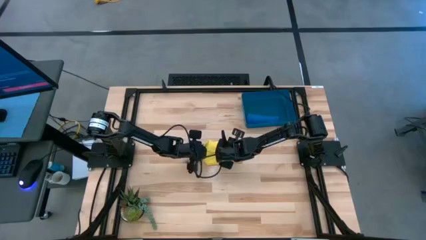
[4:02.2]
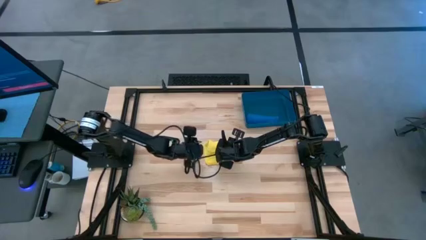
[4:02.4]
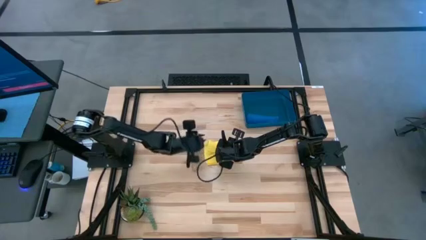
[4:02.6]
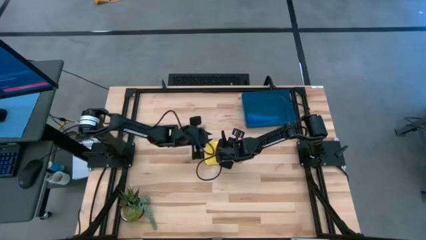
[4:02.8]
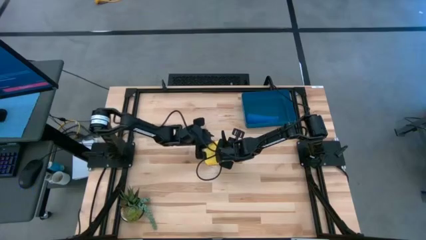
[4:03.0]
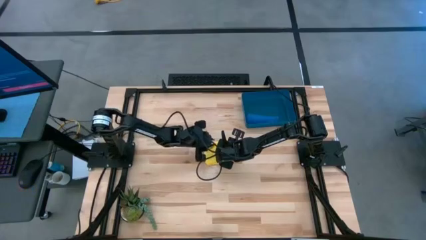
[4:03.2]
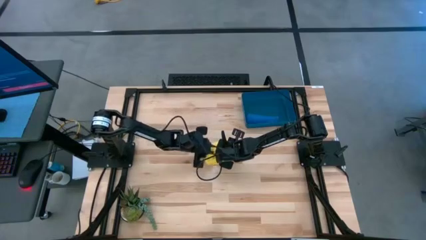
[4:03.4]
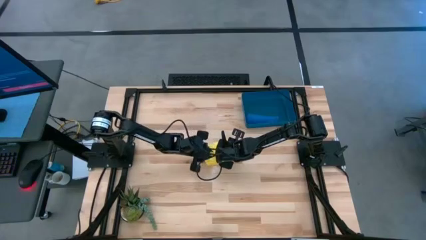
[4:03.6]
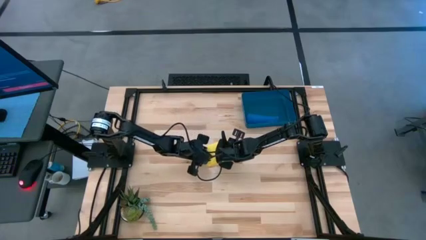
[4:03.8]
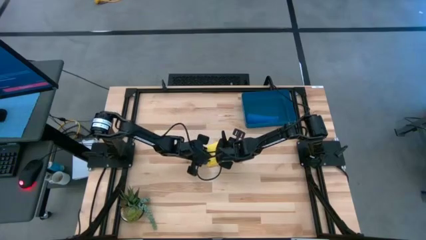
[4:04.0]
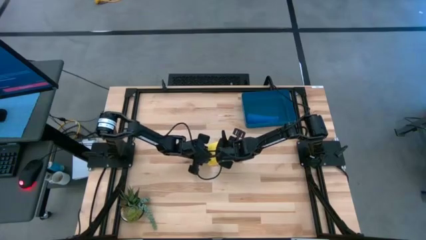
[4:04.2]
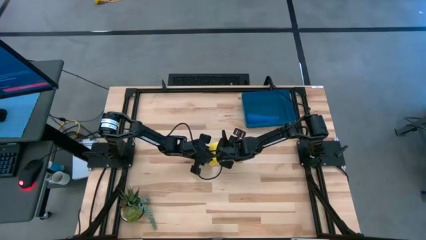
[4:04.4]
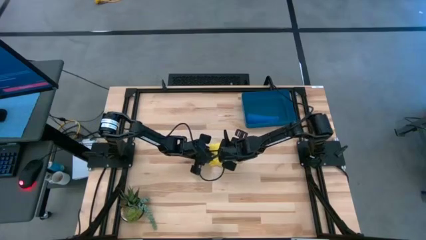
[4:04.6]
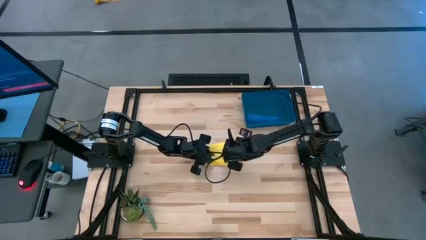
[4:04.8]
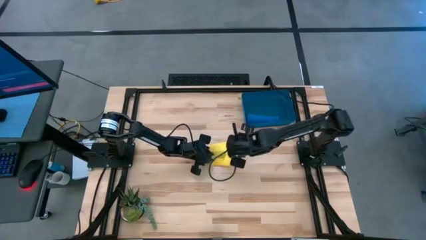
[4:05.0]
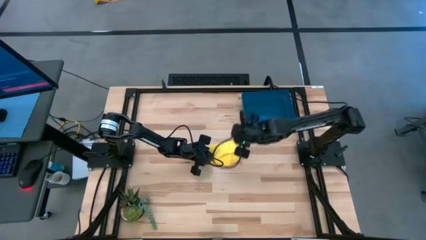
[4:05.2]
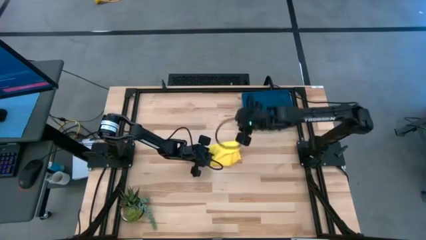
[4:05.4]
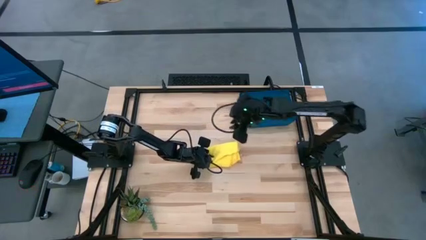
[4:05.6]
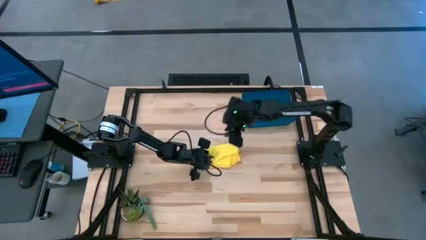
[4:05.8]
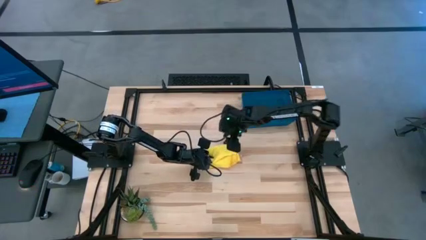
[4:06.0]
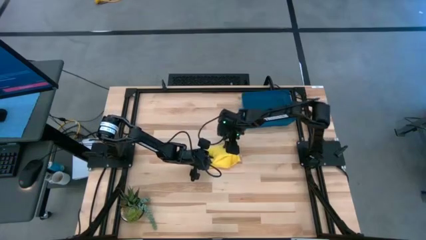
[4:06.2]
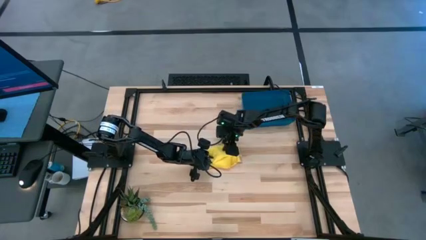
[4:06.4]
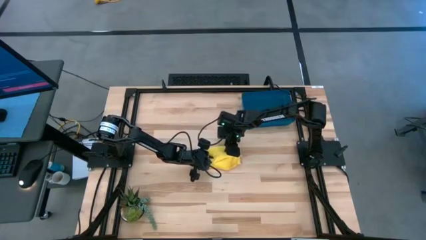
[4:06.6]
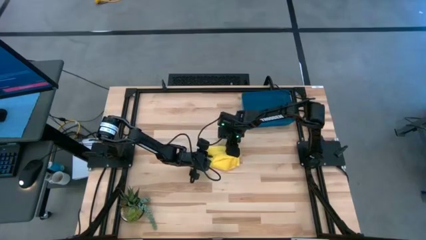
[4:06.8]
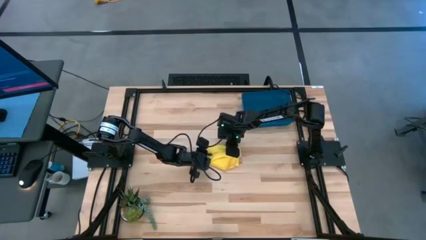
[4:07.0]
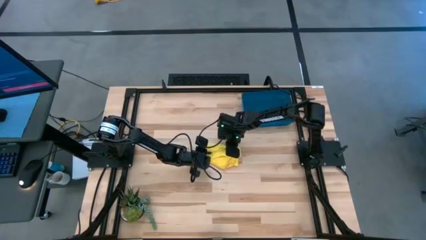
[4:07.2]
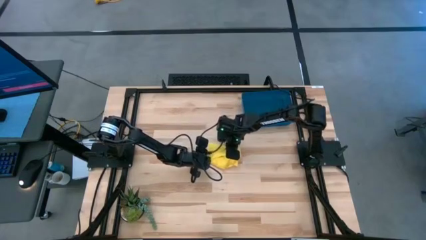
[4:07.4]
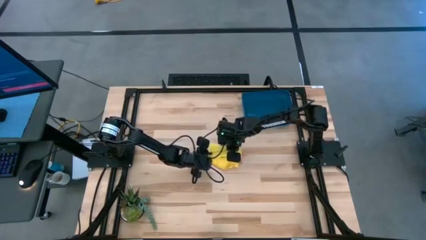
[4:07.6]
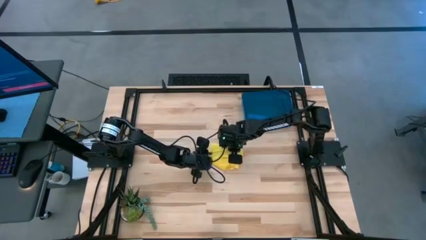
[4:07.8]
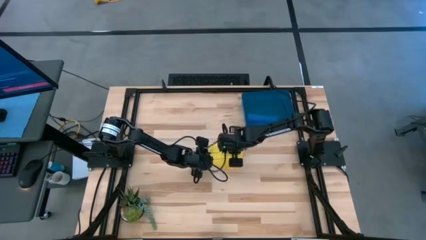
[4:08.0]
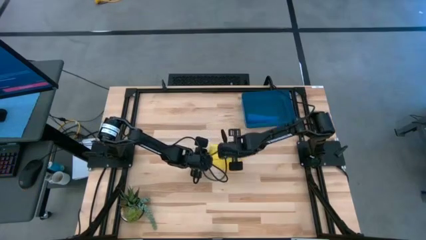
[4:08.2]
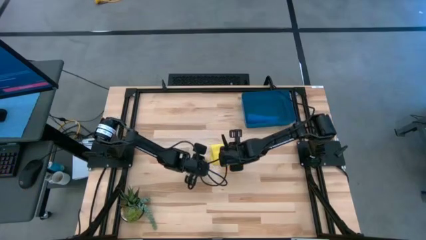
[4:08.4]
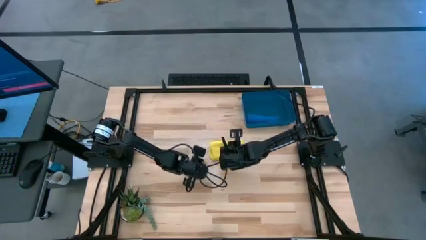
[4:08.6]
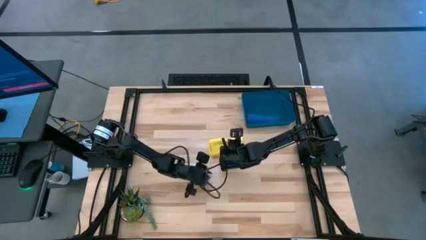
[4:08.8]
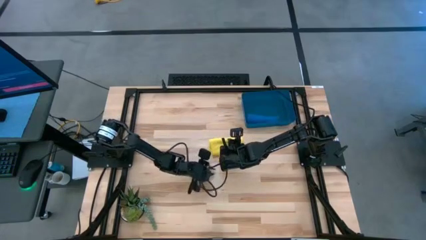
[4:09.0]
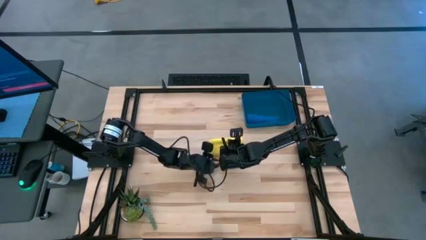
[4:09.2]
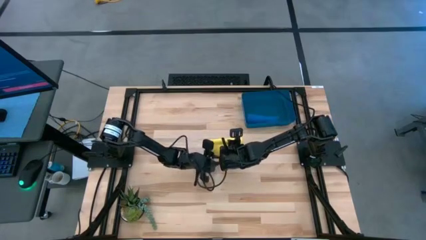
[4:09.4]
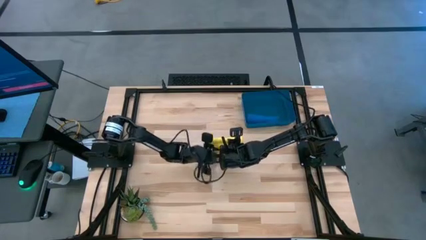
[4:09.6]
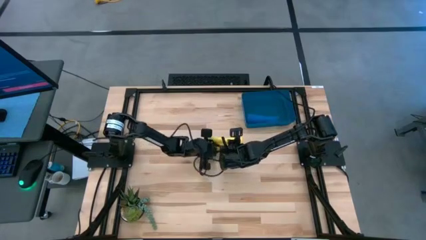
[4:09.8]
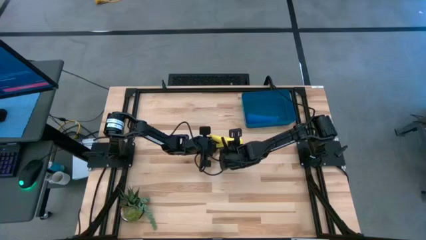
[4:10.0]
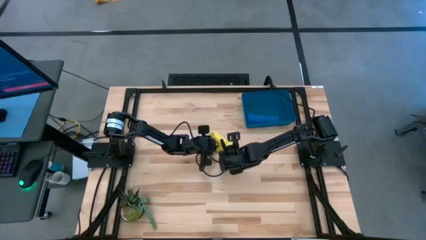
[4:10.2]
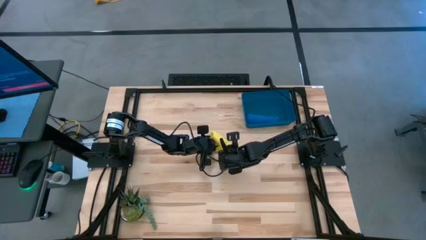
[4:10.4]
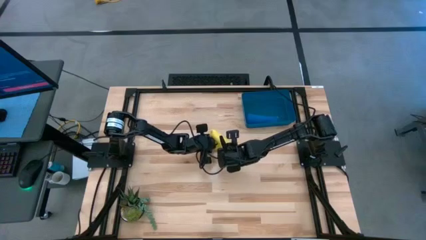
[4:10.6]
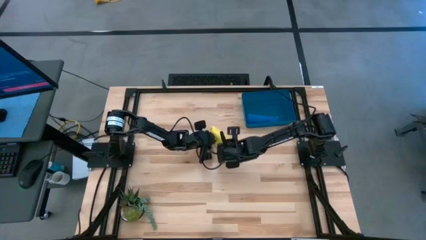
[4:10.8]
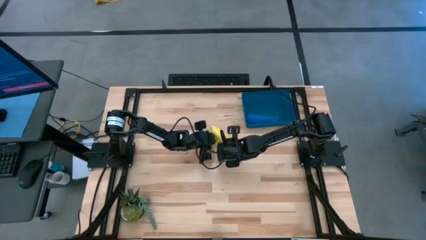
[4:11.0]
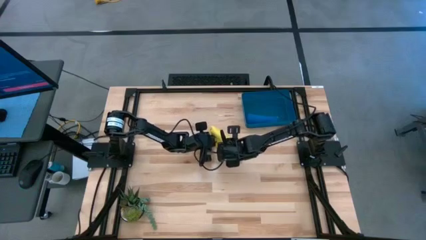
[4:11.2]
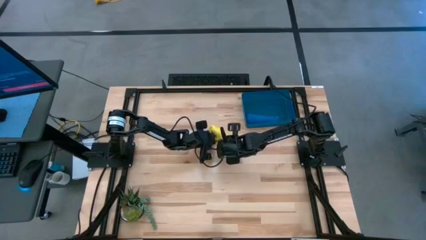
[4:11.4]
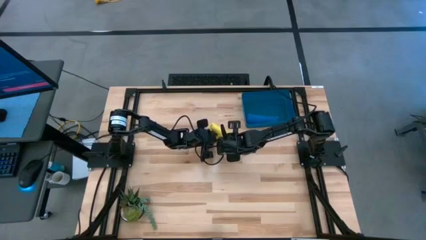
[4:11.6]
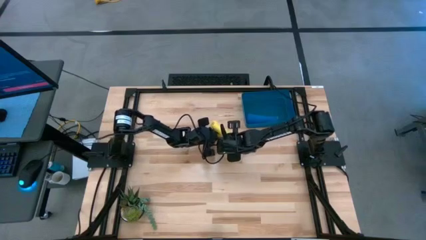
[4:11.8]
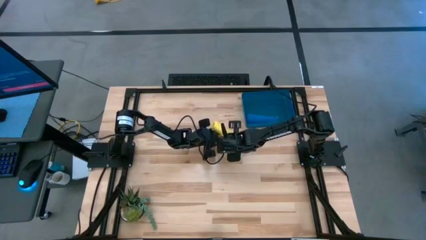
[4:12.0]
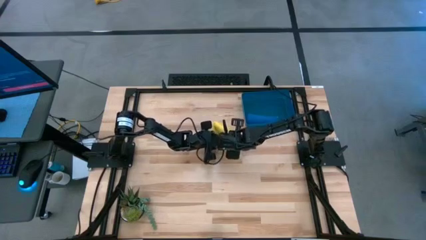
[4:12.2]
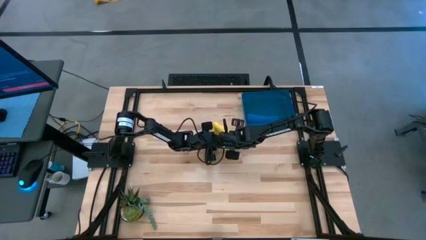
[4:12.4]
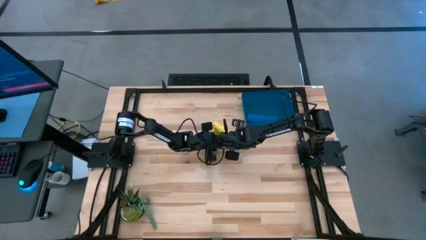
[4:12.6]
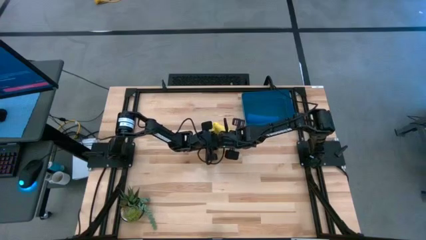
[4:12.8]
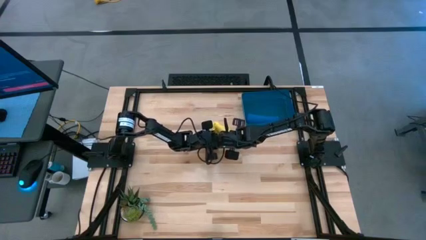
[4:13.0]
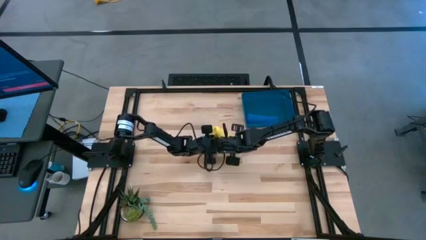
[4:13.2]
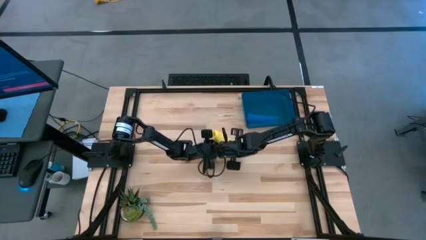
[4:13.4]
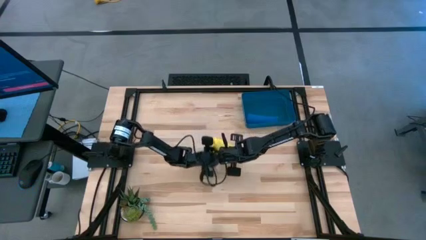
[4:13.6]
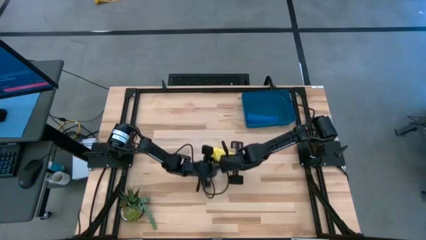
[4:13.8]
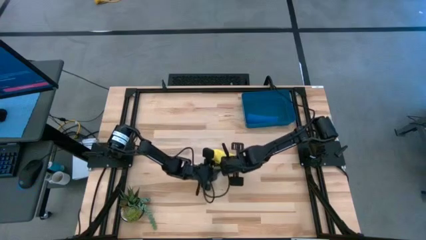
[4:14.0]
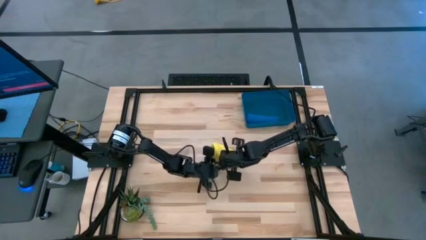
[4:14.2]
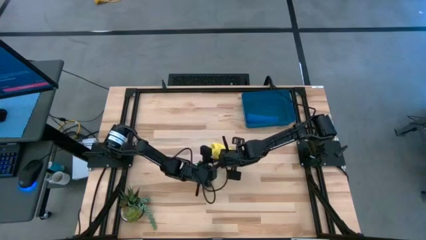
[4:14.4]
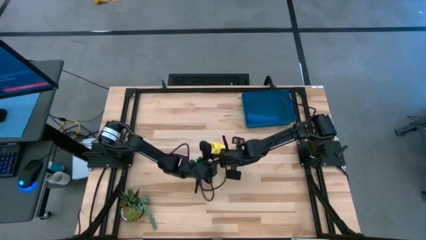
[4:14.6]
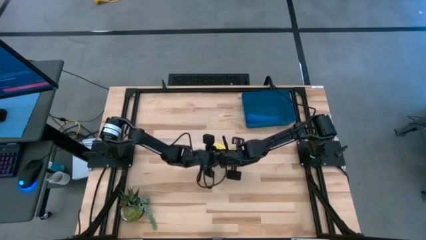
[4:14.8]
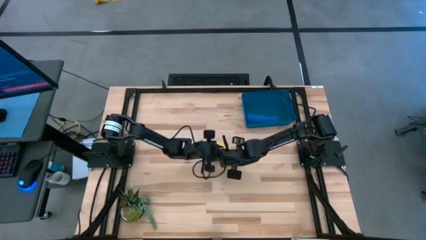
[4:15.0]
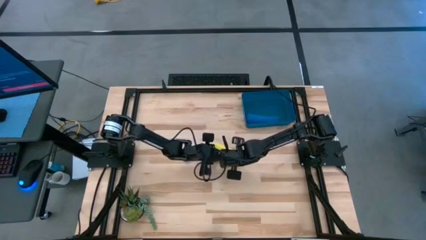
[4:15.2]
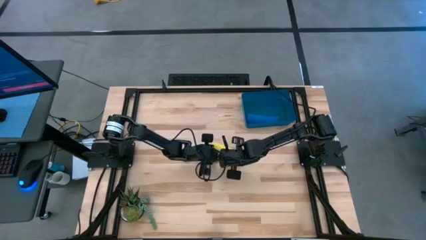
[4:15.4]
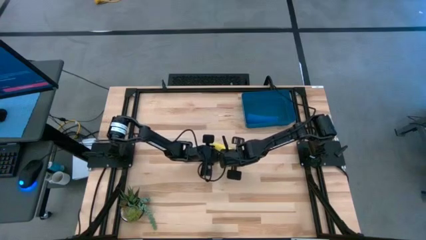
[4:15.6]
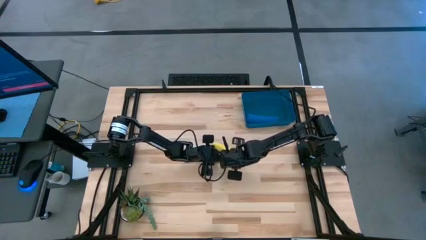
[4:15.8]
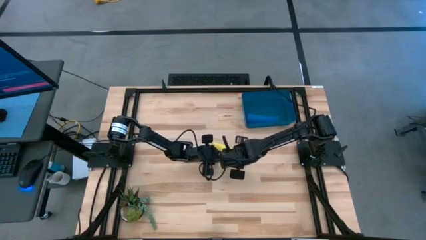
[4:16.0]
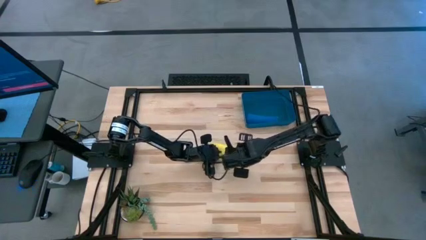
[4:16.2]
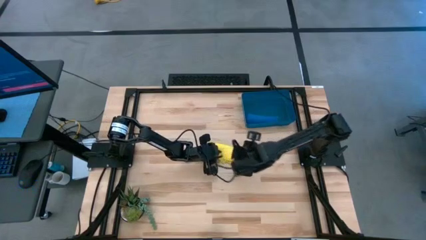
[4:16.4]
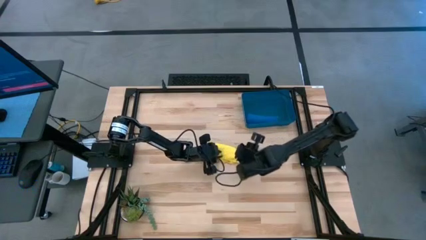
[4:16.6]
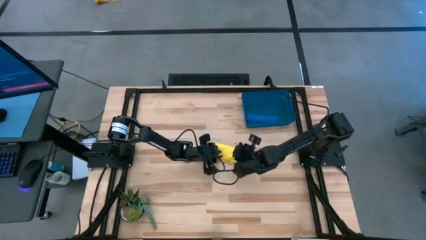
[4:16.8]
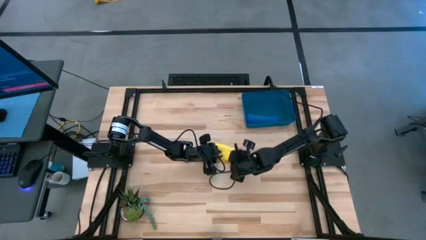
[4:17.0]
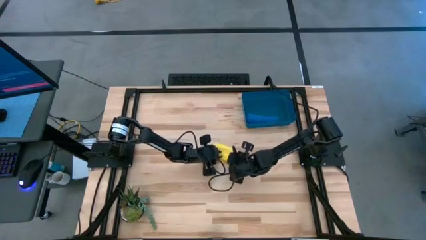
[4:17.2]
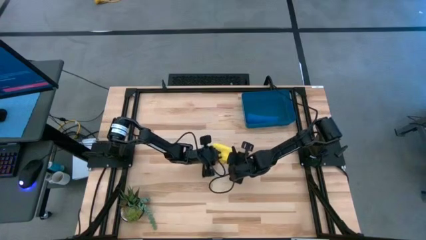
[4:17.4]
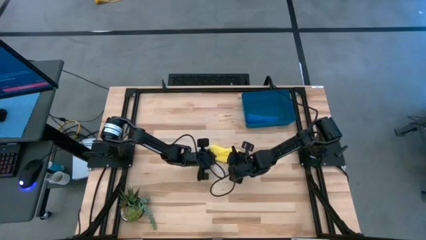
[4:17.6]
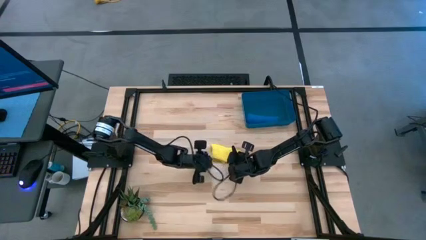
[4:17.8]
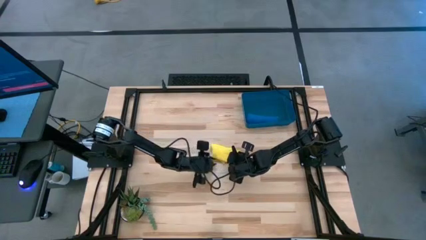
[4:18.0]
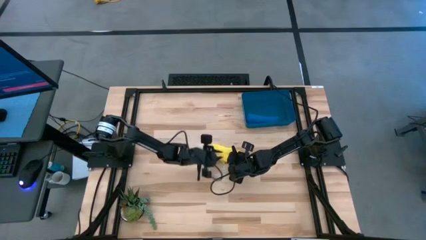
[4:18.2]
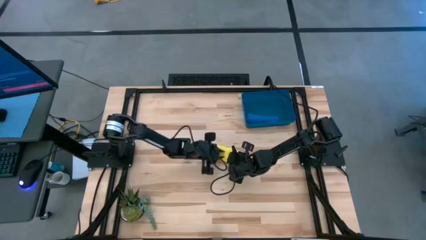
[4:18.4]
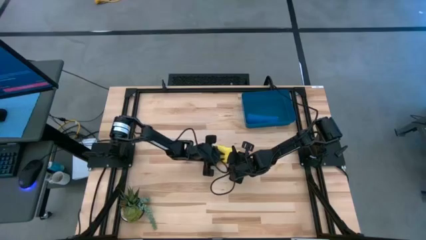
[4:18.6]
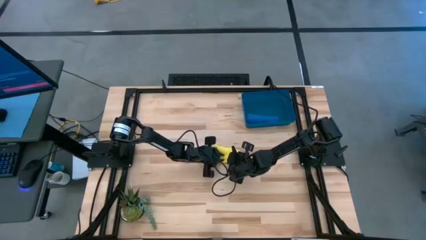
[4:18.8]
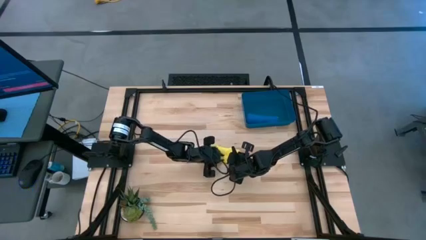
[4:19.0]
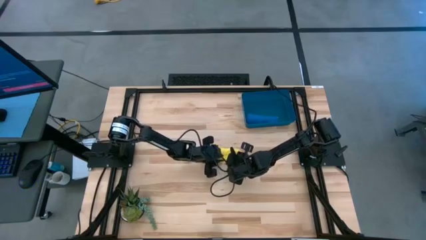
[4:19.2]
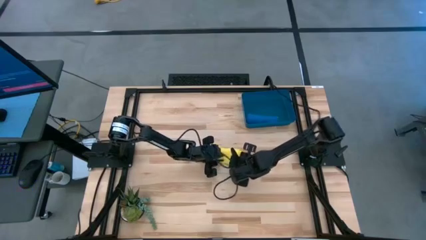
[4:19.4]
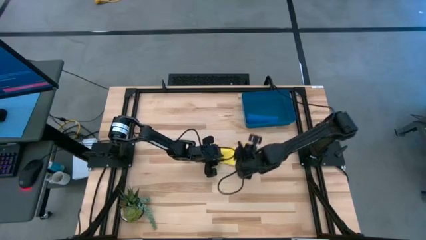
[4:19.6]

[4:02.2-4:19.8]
Task: Roll microfiber towels into tight, uniform cylinder then place into a basket
Roll the yellow microfiber cloth
